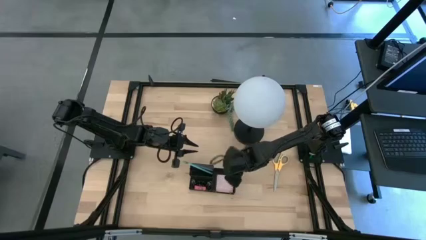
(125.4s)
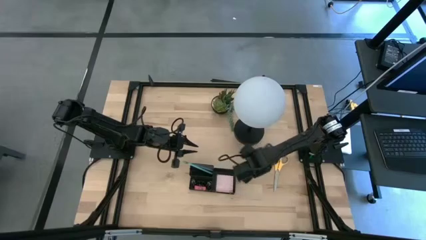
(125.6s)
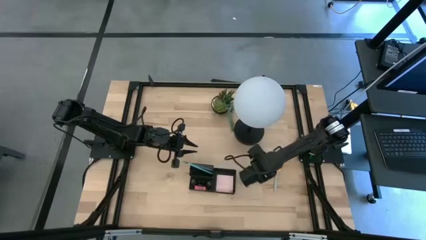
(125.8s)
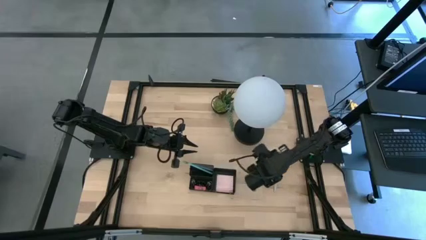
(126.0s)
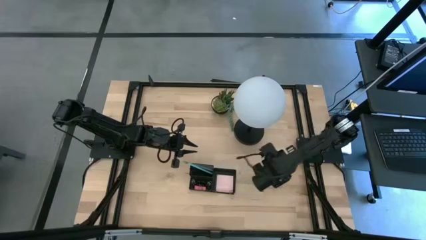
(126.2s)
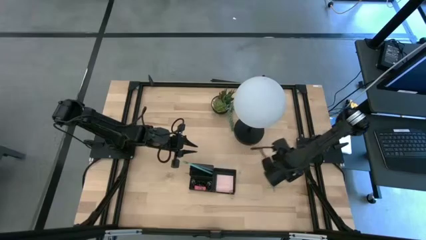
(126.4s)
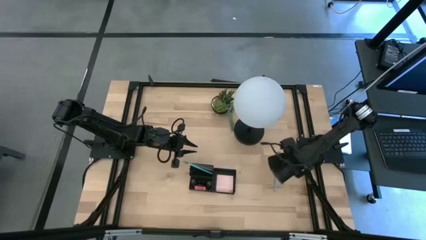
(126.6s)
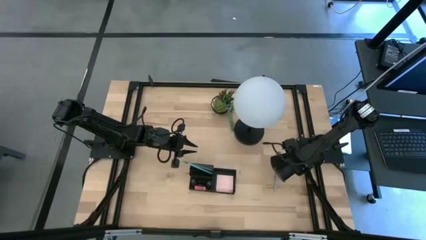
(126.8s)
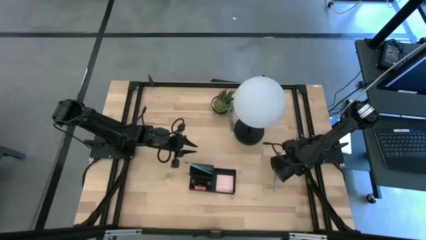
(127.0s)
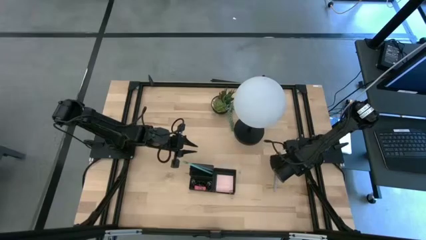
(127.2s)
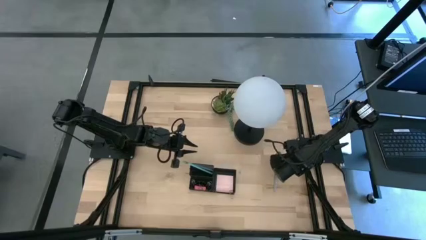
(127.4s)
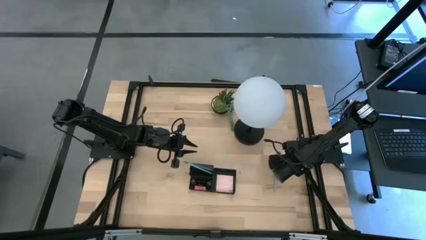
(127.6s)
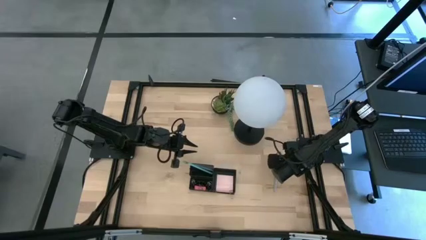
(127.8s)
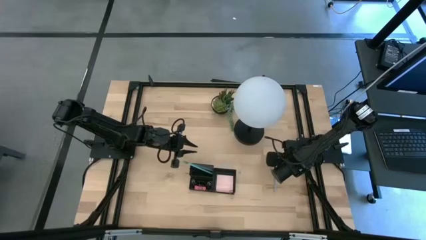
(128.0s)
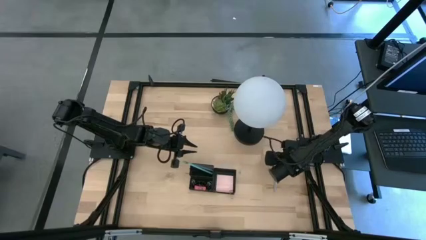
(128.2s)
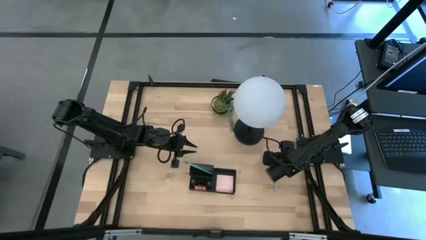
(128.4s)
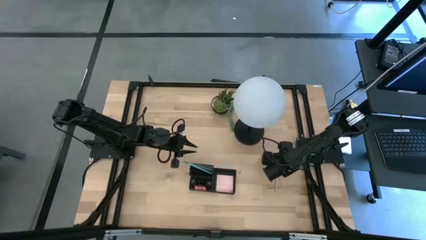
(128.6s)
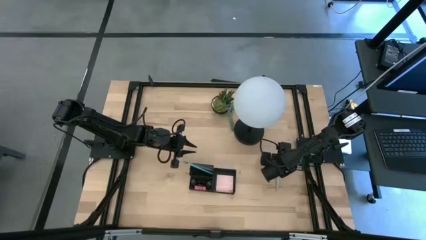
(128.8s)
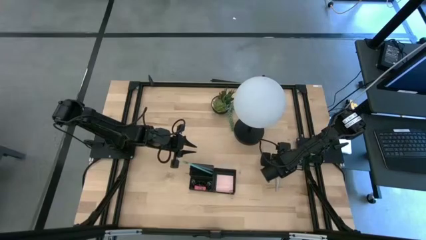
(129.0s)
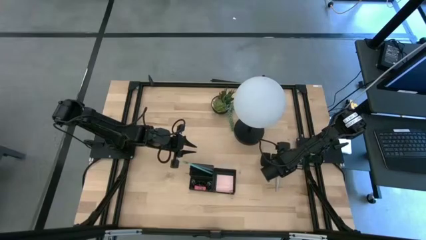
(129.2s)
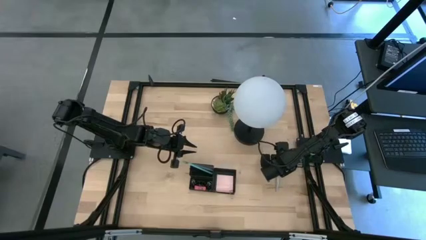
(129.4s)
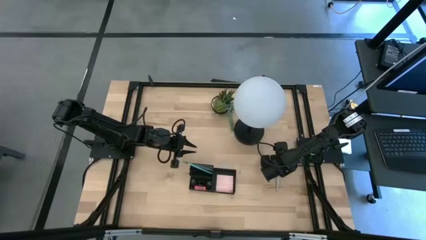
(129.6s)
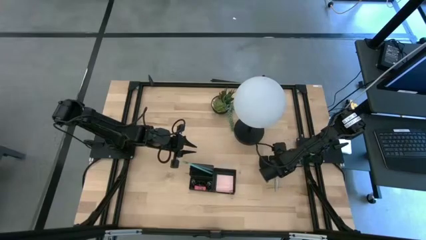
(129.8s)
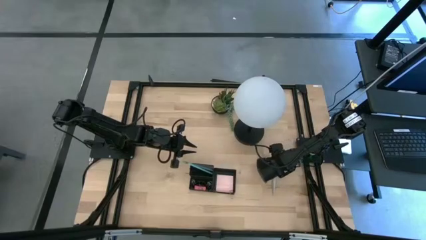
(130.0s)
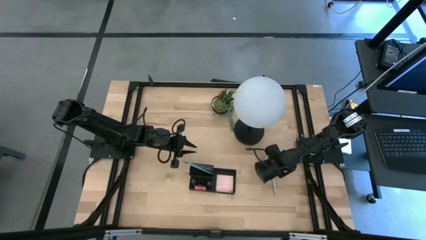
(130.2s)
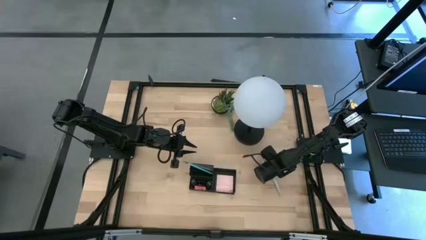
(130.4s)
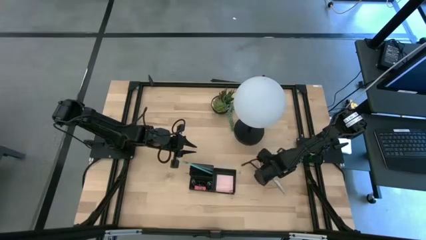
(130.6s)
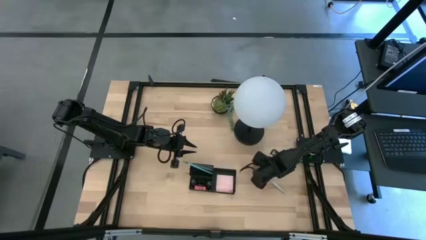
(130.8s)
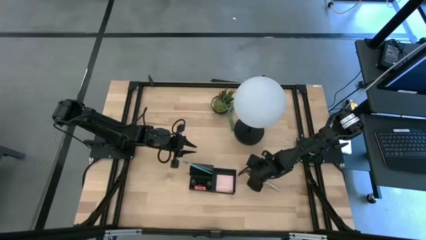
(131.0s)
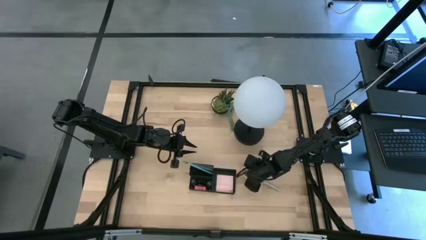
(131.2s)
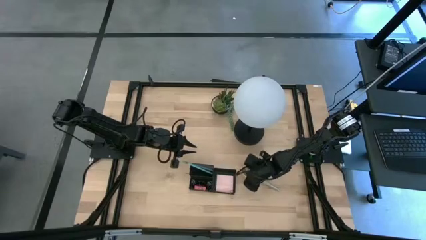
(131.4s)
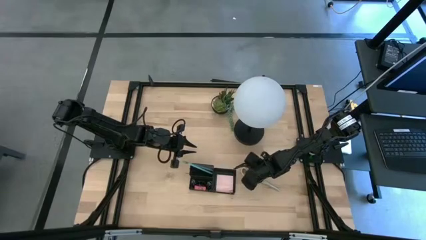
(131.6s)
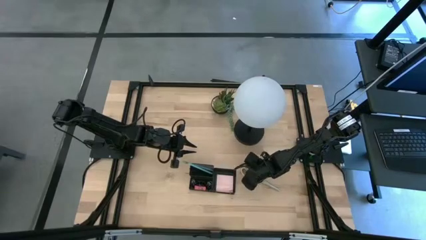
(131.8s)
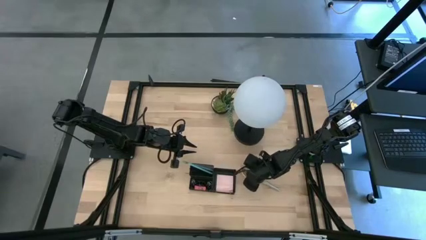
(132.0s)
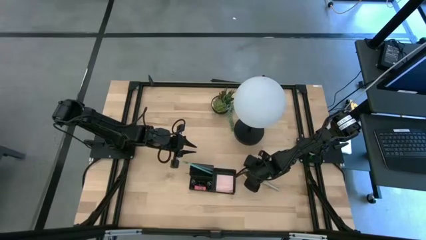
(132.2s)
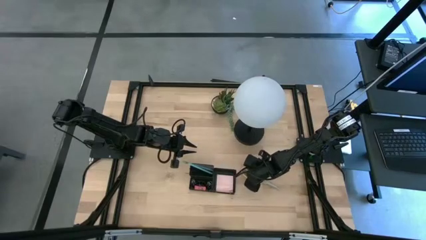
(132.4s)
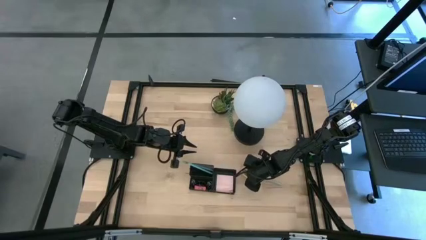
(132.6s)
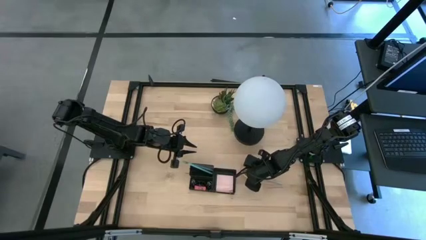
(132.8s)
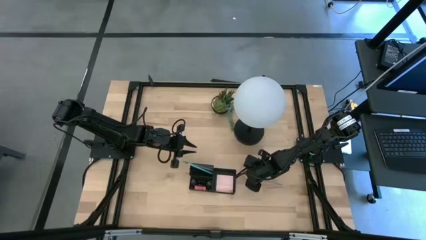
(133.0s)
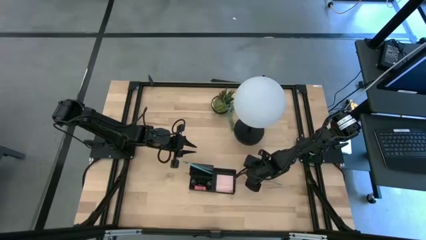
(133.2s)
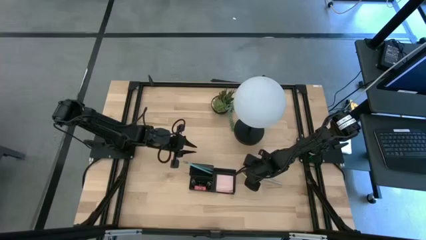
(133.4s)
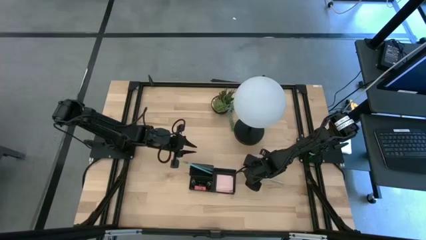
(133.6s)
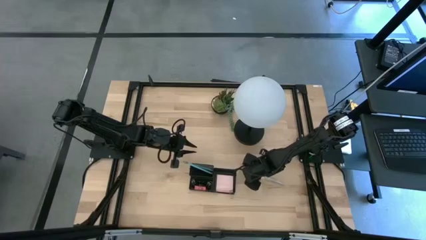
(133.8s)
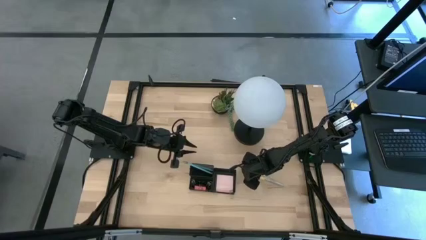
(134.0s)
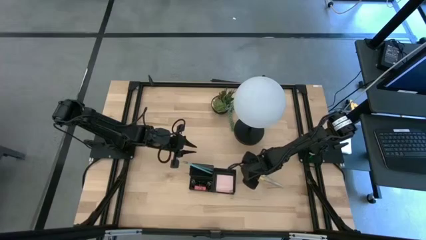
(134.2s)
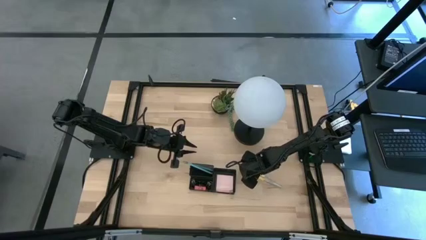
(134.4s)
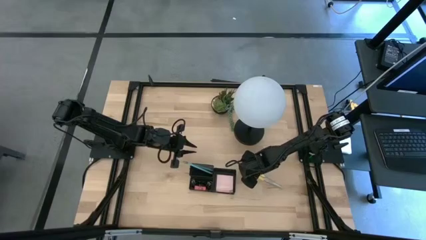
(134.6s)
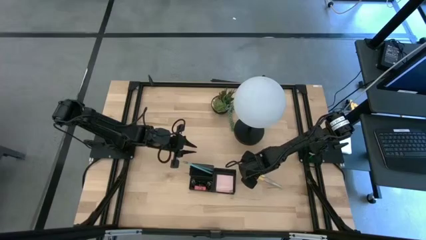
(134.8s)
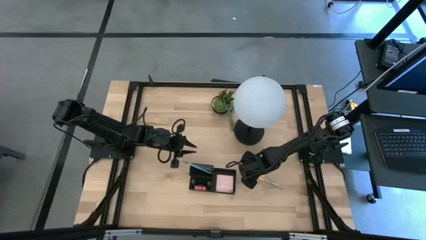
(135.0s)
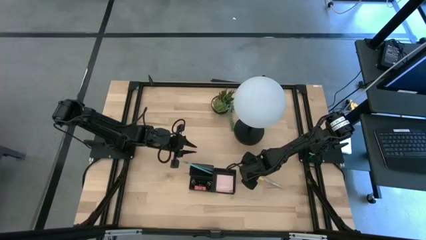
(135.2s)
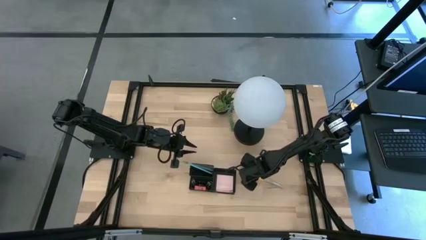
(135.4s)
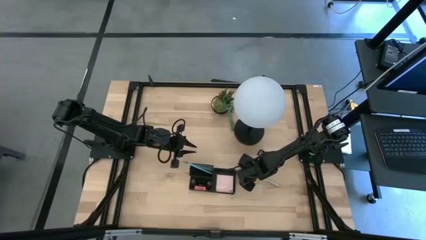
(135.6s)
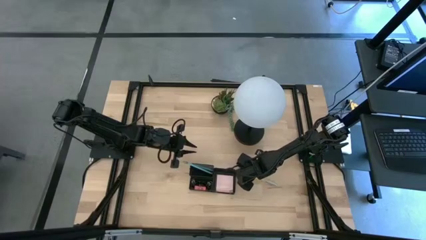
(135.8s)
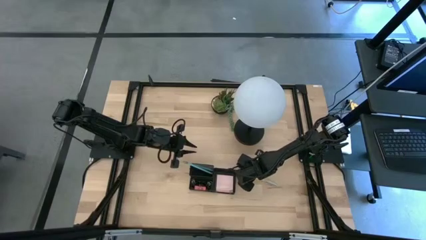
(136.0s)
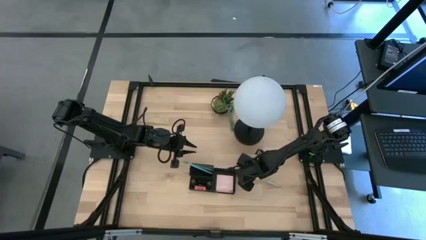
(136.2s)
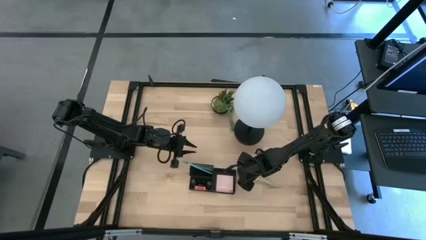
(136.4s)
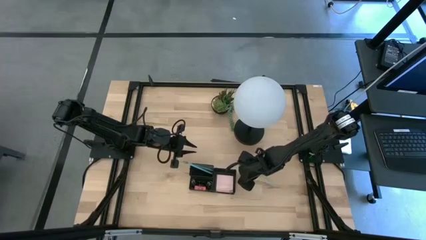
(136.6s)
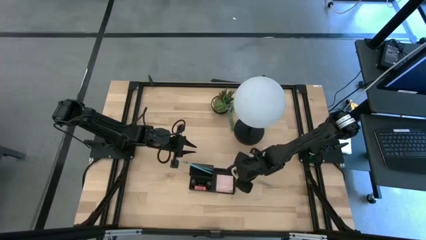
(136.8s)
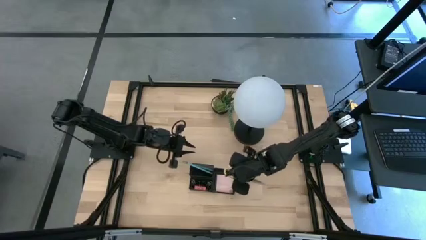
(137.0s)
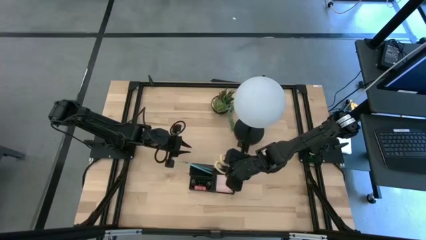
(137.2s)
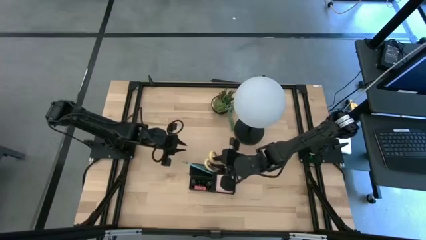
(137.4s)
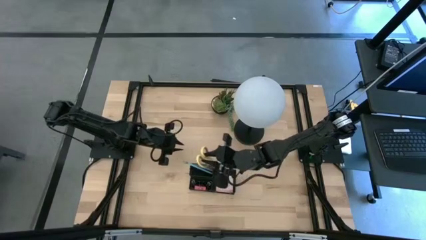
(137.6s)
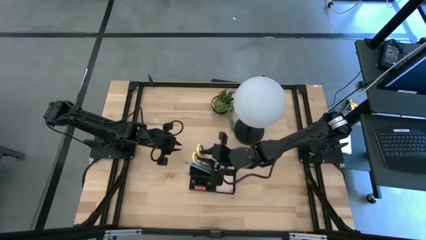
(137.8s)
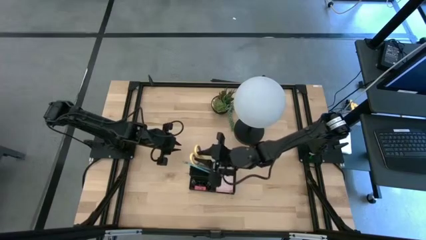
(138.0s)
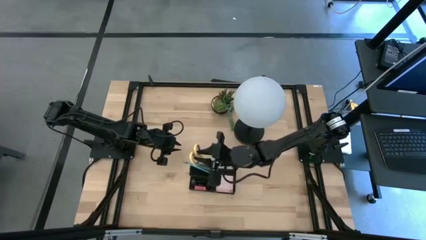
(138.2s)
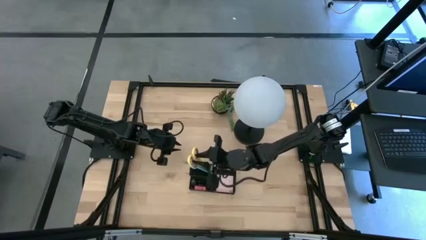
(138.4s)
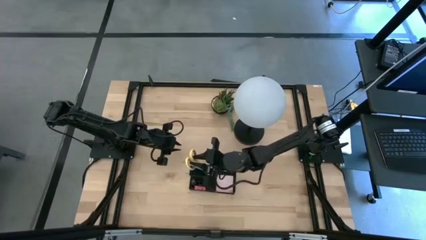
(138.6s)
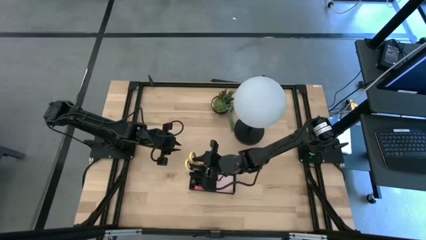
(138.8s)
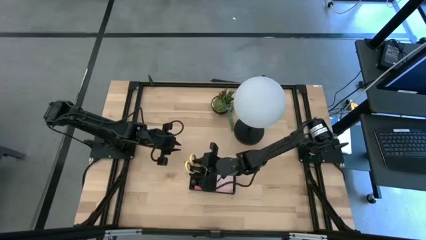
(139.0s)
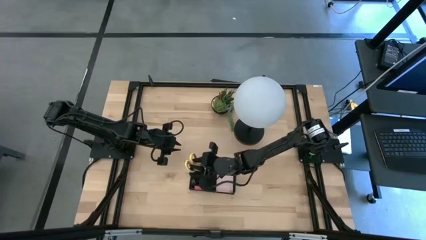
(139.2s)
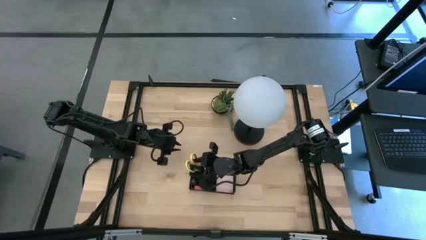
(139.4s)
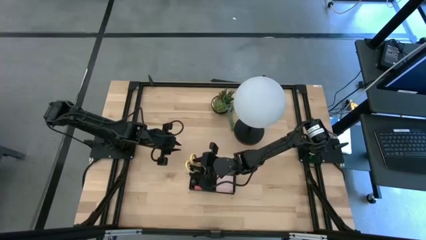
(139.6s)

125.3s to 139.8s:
Task: Pick and place office supplies into organizer
Put the scissors into the desk organizer
